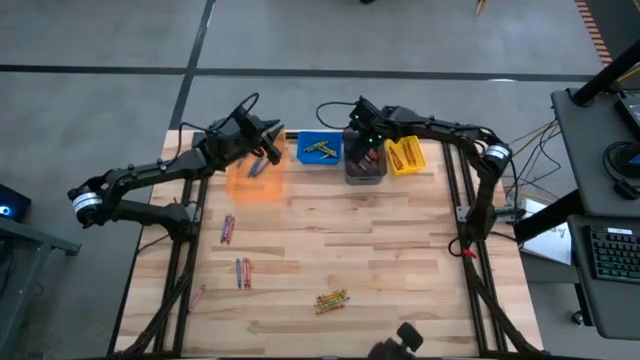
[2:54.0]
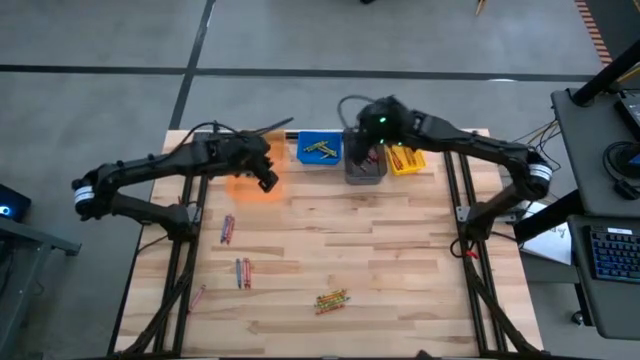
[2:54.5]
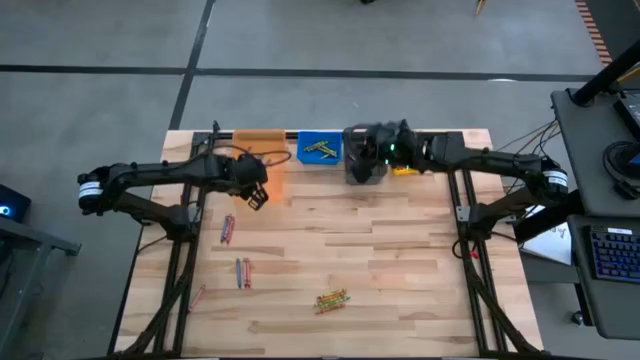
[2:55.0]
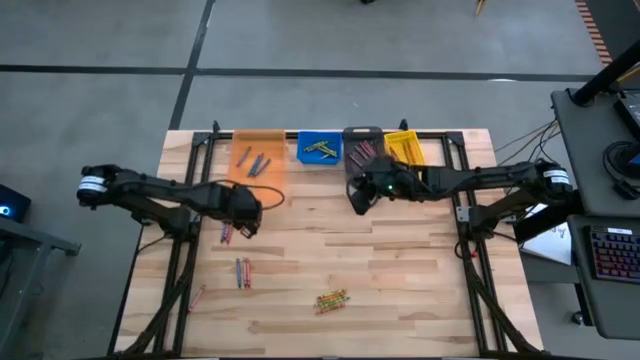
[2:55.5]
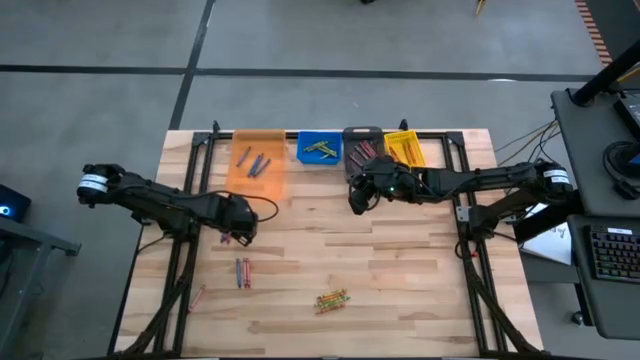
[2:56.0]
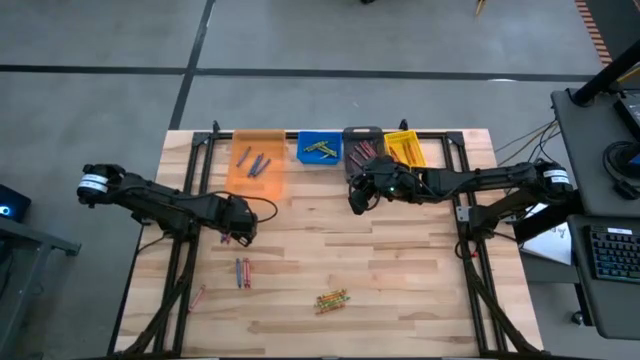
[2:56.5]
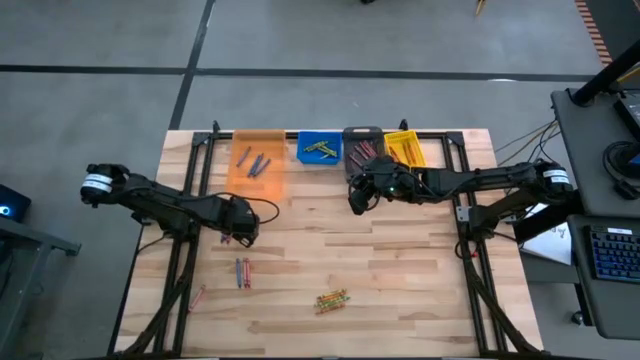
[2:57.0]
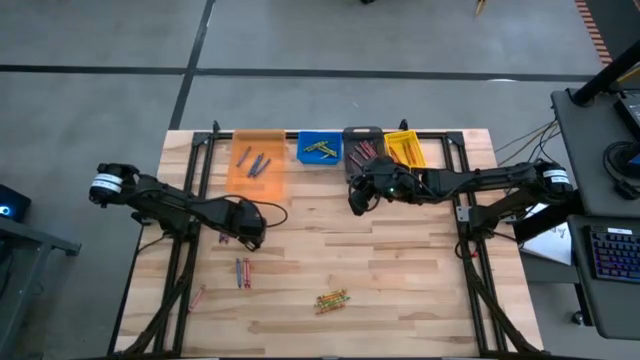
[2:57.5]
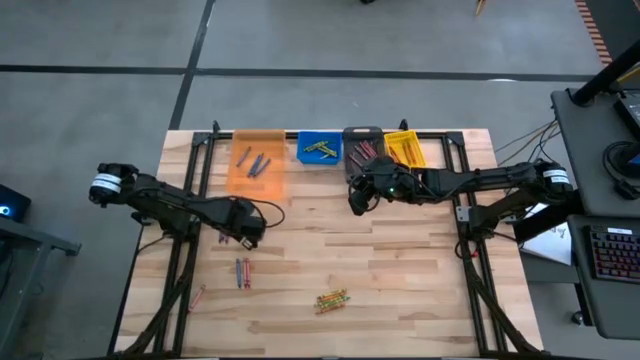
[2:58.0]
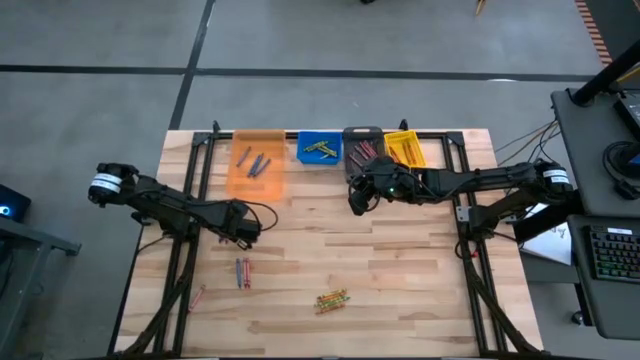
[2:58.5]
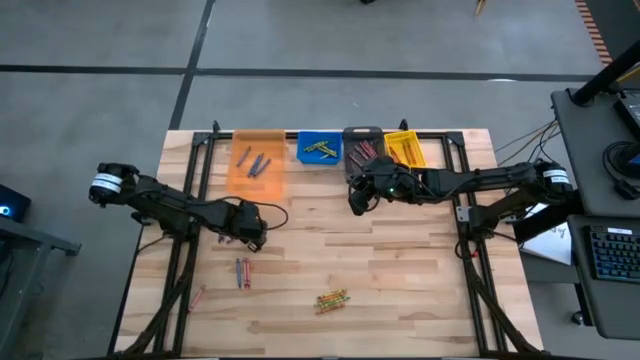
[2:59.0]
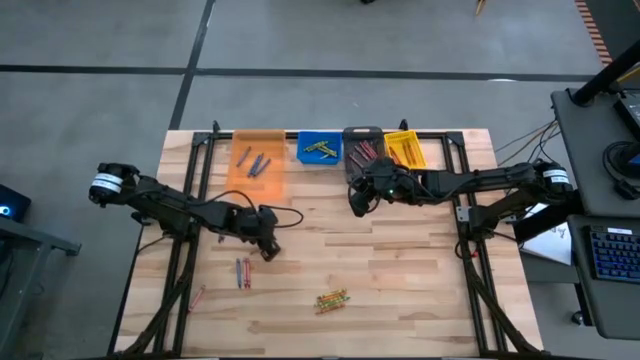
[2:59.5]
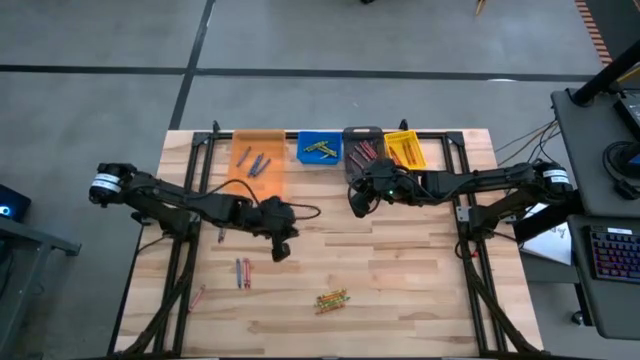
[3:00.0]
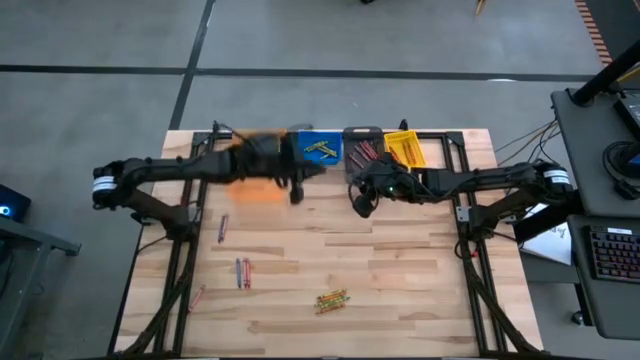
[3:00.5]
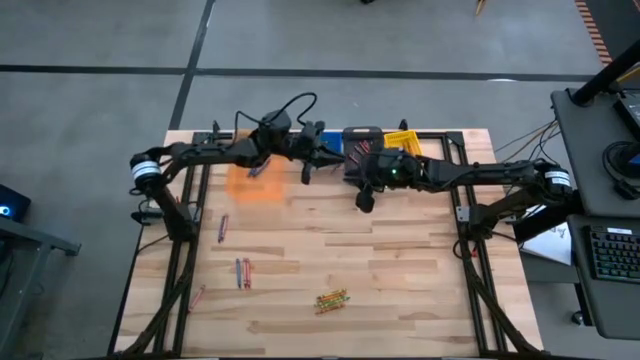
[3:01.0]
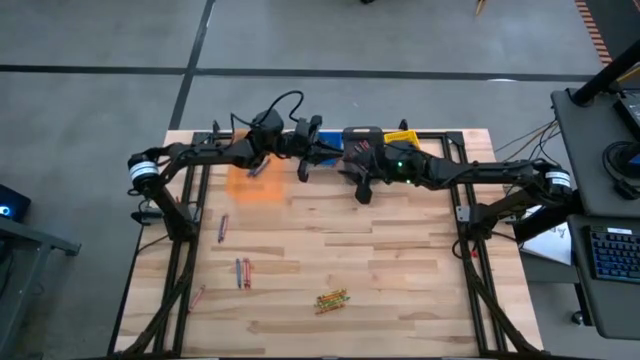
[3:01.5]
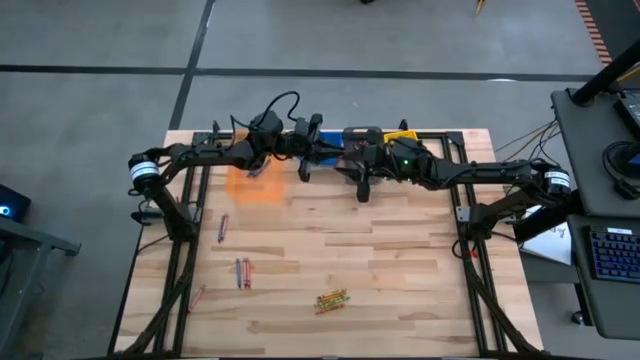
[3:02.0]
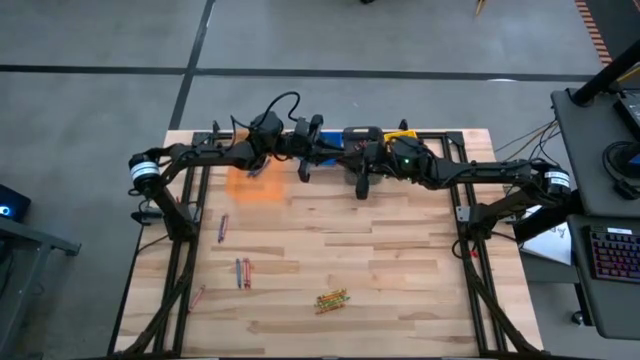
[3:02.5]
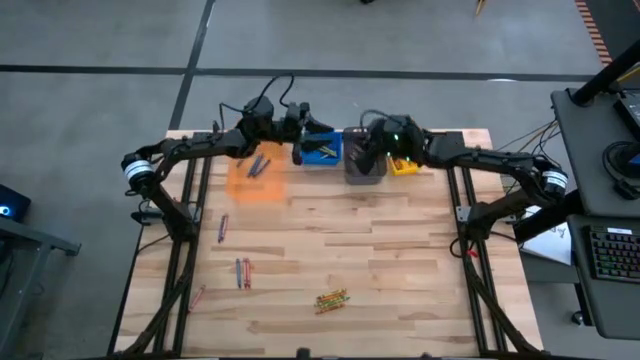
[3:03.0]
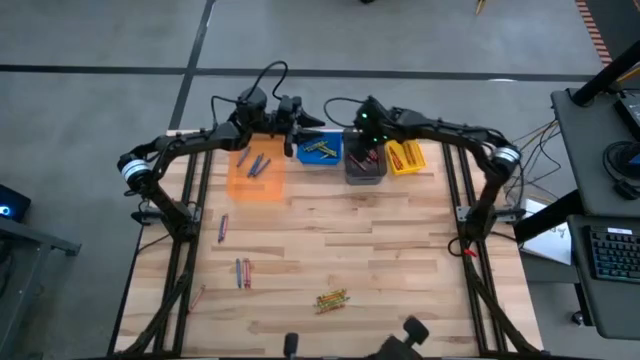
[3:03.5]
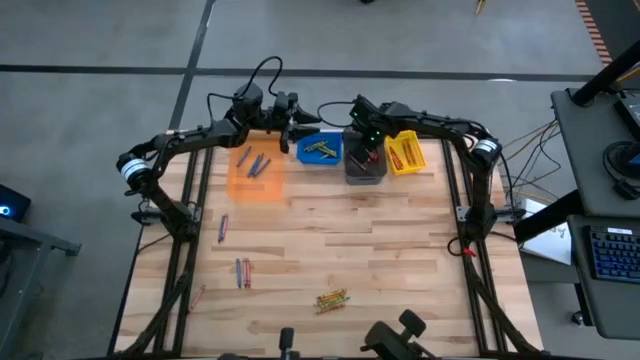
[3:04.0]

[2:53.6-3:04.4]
Task: Sort crayons
Put the red crayon into the black bin

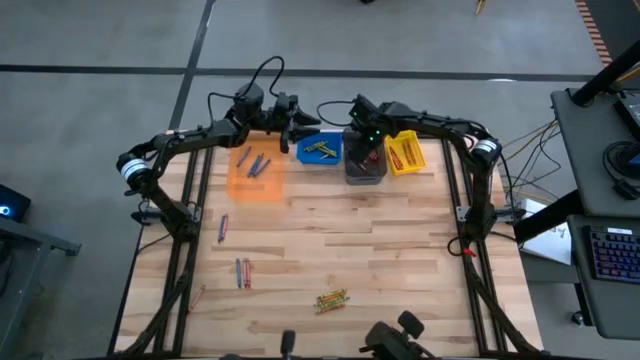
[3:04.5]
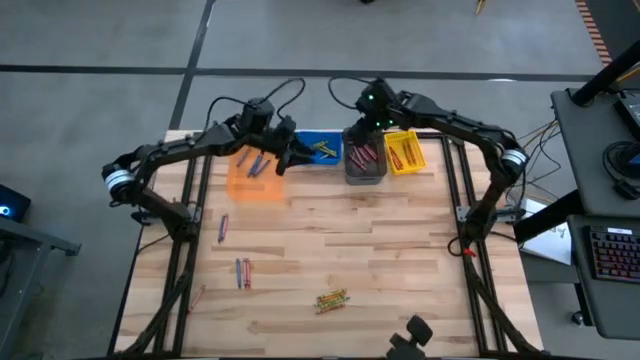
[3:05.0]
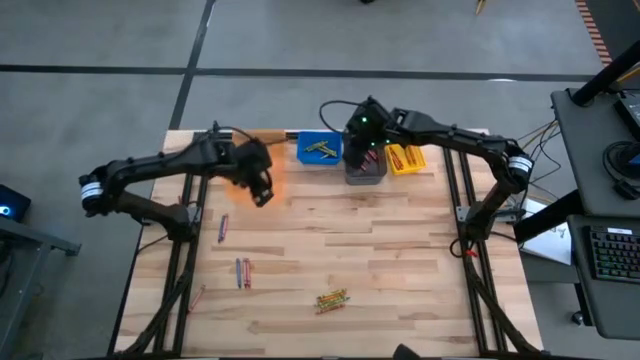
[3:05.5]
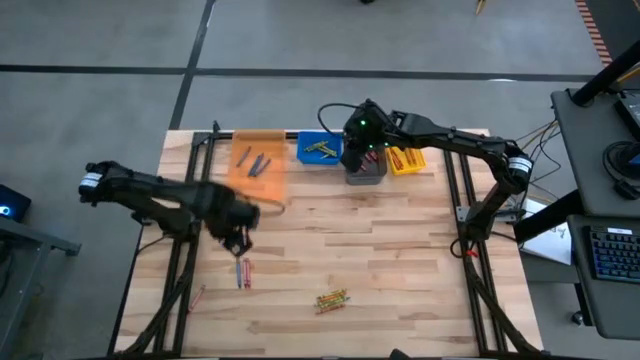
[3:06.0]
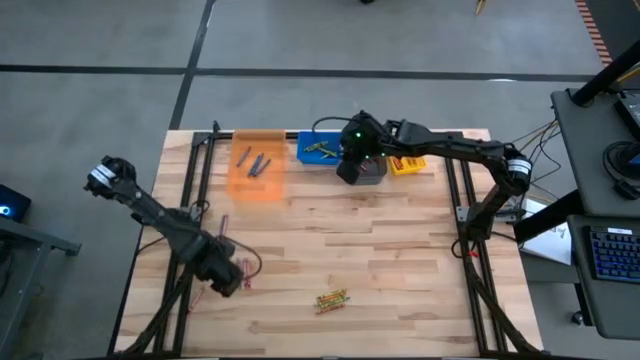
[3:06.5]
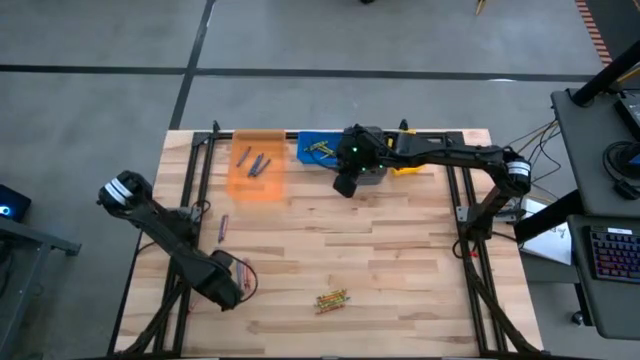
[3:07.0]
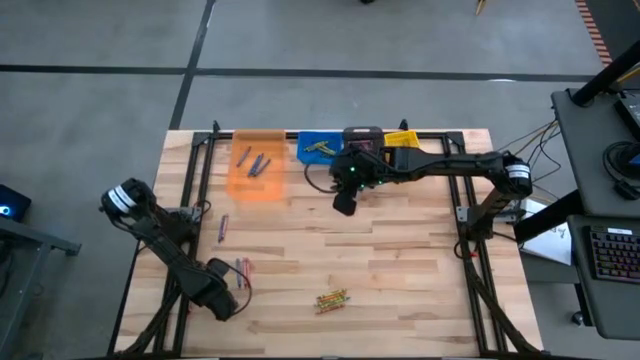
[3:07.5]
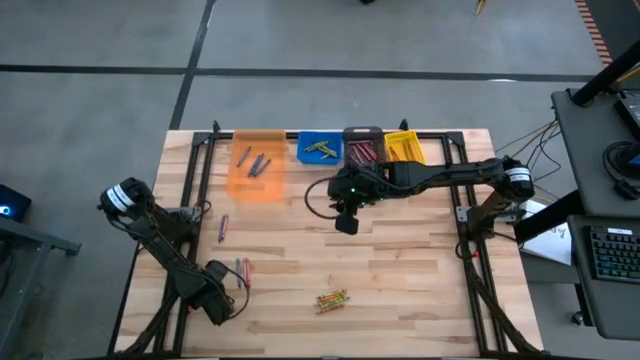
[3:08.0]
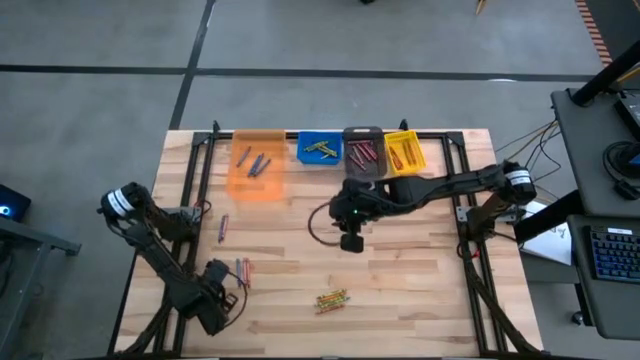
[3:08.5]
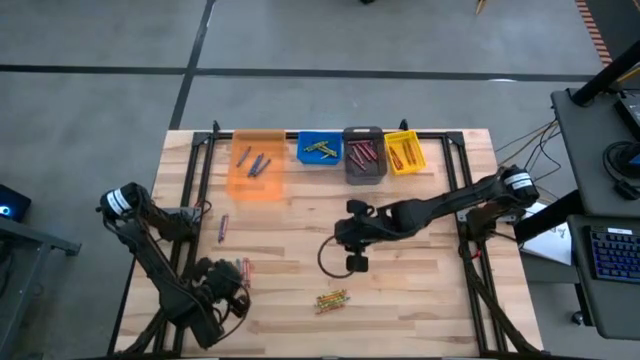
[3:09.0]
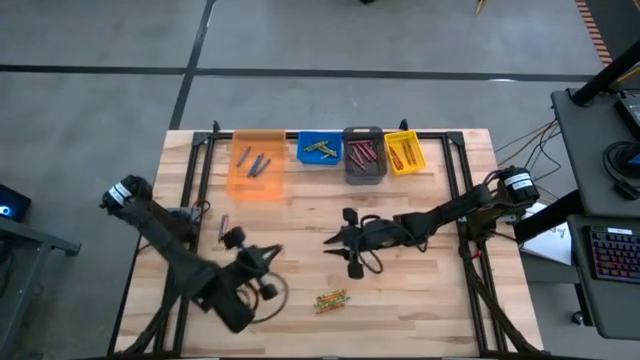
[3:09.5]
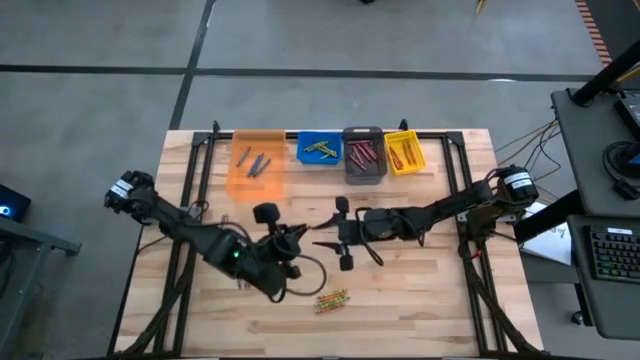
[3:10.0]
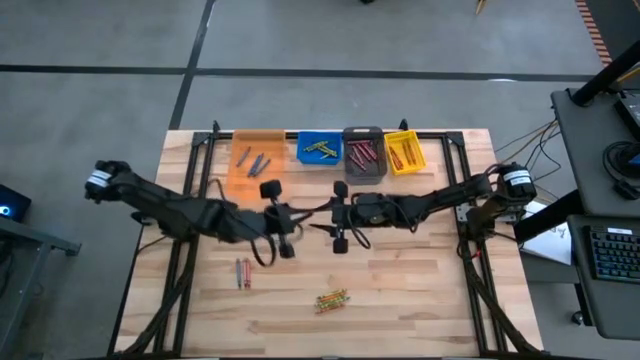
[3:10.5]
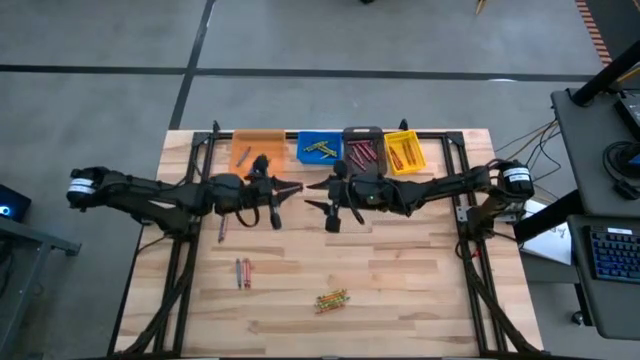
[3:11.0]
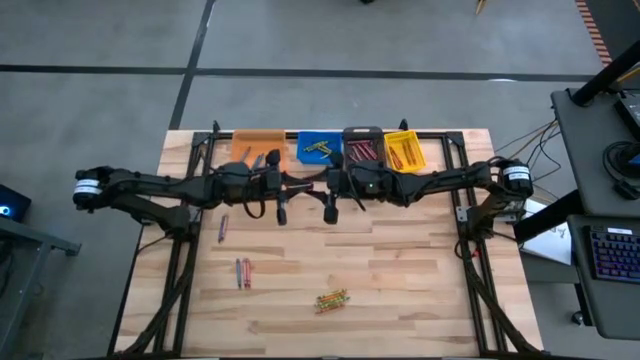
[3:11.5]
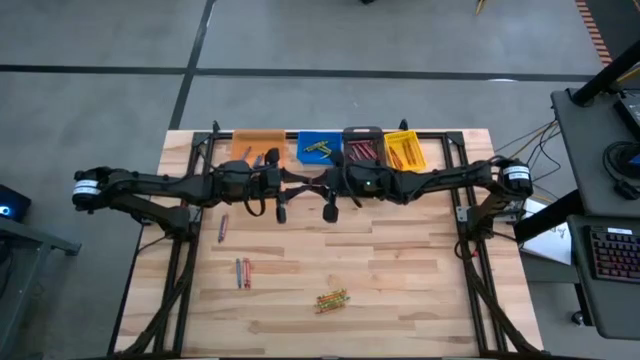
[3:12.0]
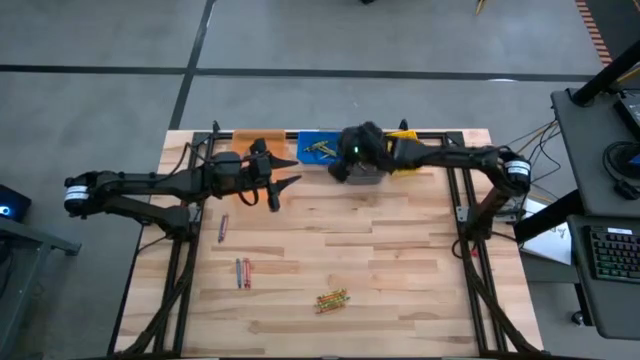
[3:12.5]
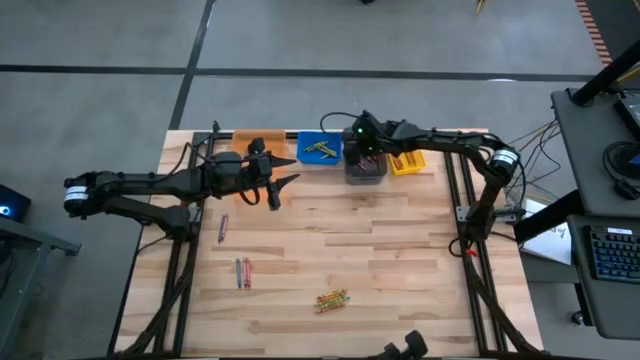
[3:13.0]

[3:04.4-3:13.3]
Put the red crayon into the black bin
